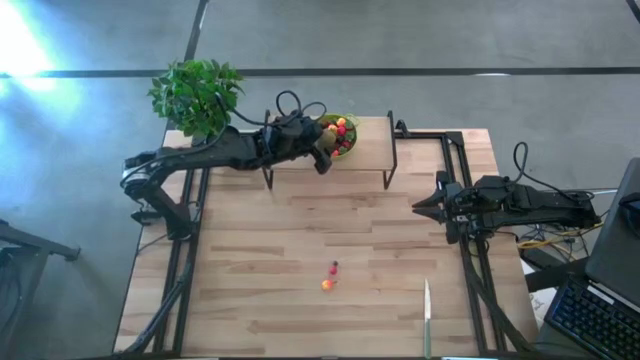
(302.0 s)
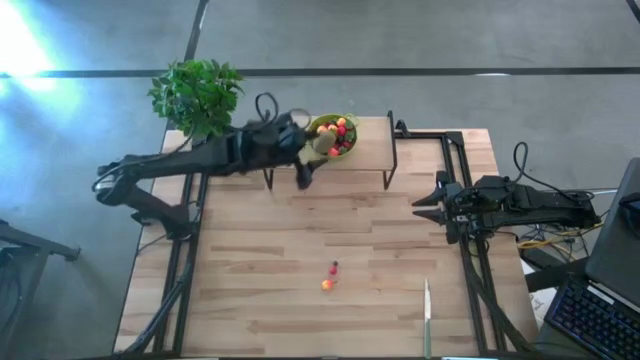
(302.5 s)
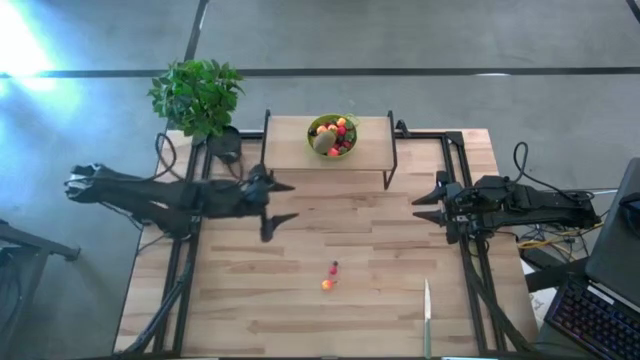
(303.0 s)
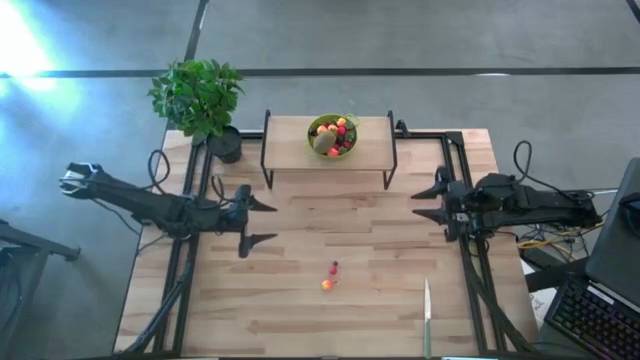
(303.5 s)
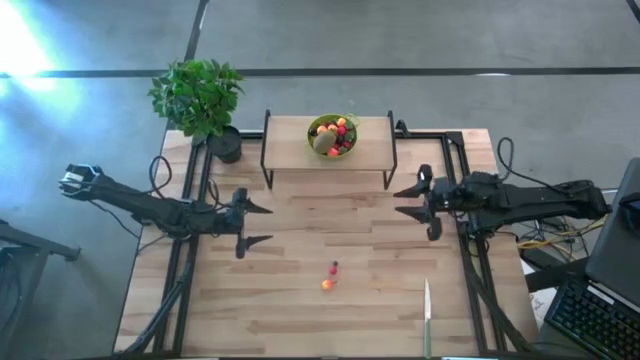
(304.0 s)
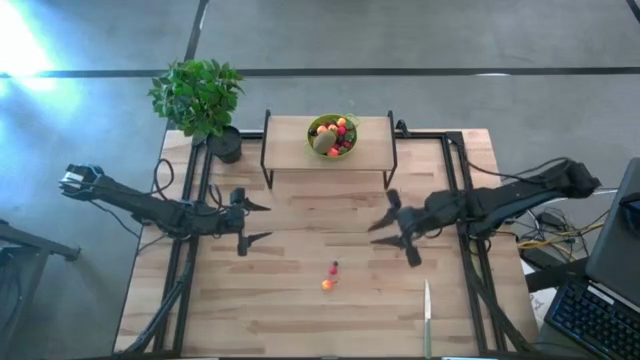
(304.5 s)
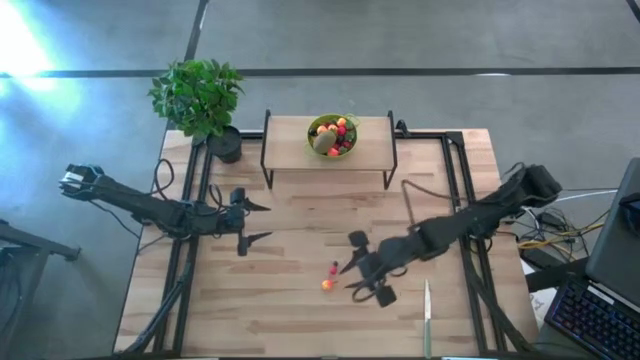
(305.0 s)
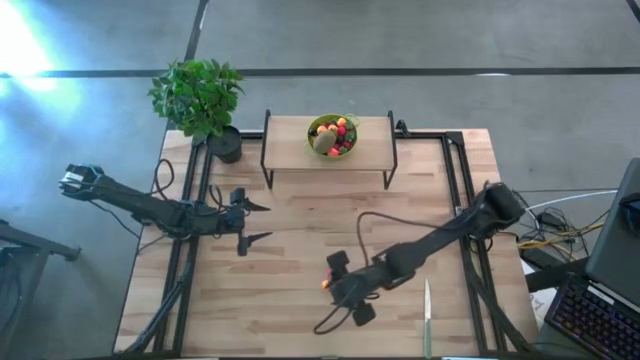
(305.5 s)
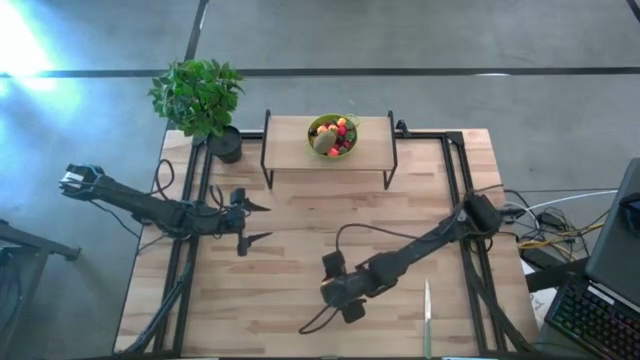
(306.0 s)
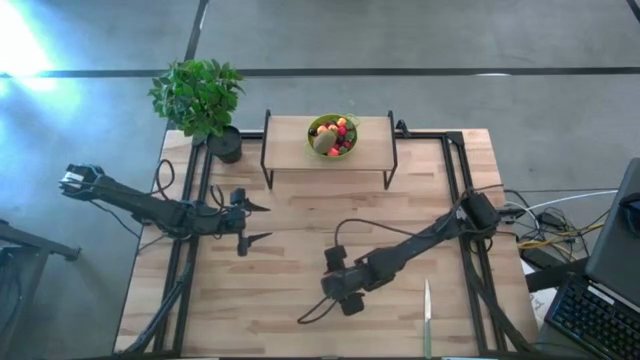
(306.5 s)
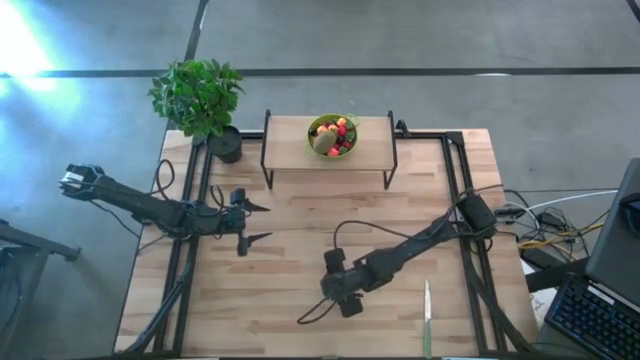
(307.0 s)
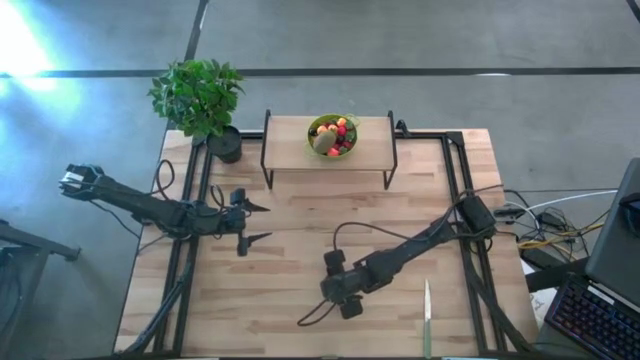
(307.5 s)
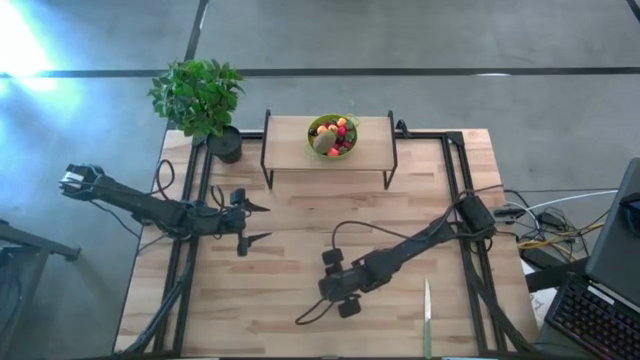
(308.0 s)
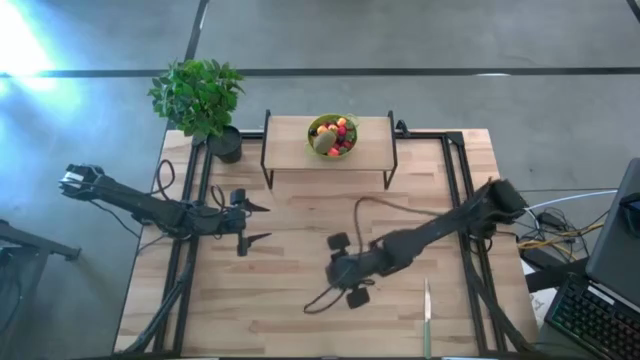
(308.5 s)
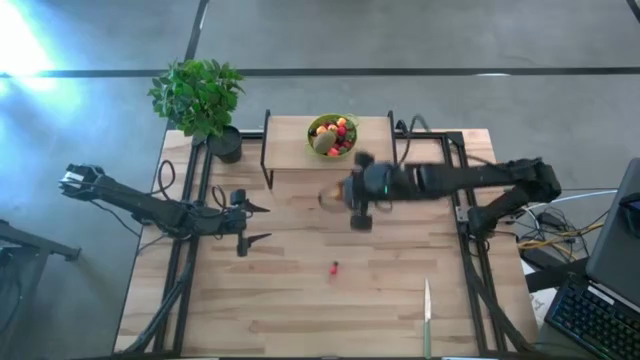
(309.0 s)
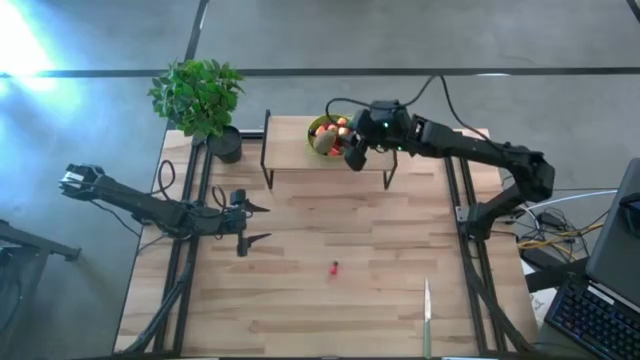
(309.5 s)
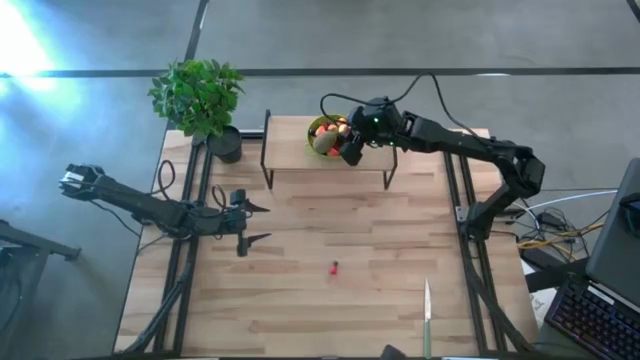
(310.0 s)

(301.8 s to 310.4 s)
Task: Pick & Place Fruit
Put the yellow peach into the green strainer bowl on the shelf

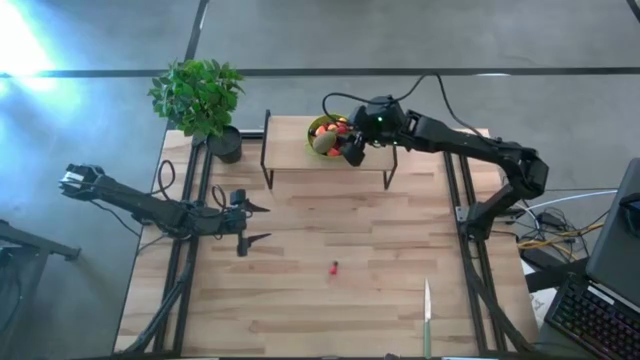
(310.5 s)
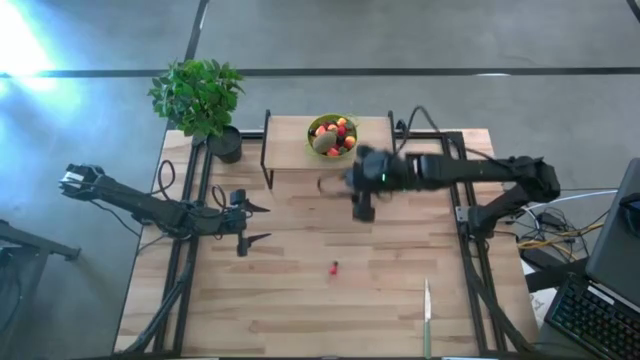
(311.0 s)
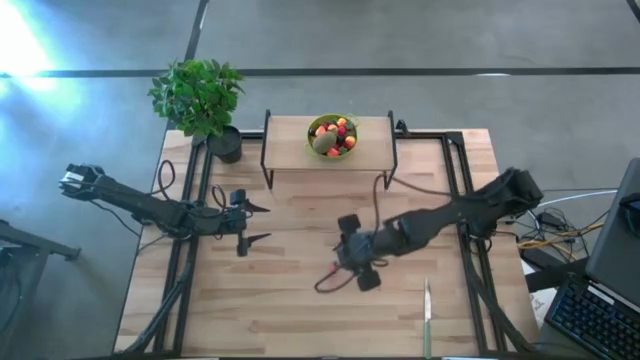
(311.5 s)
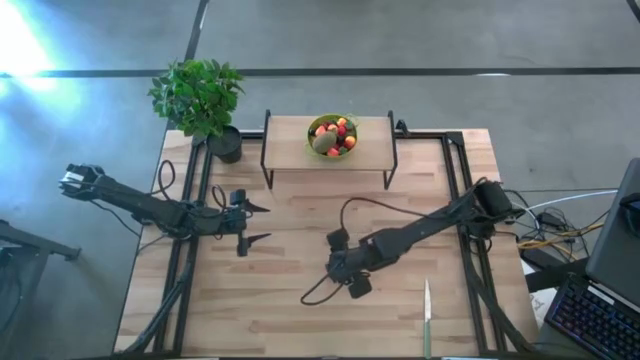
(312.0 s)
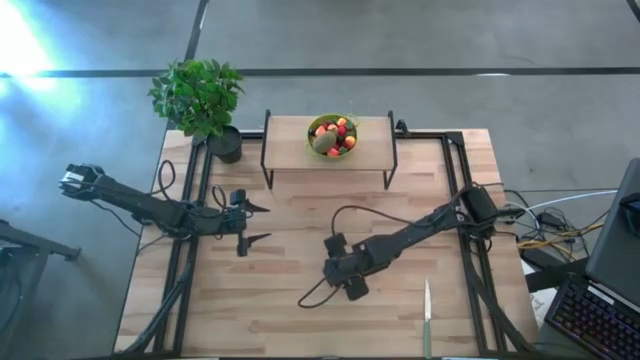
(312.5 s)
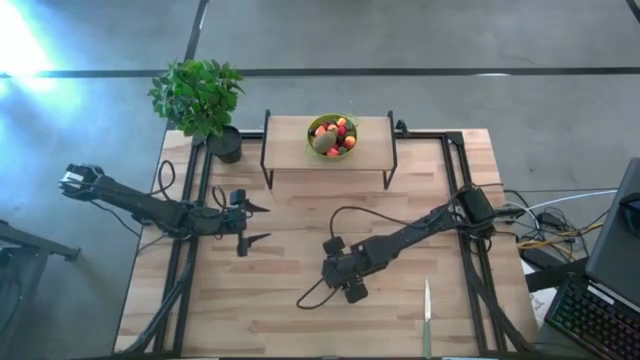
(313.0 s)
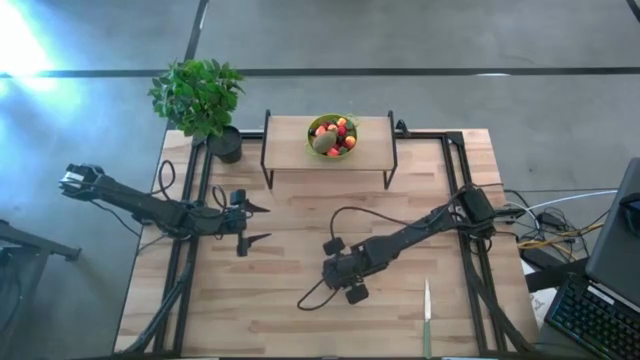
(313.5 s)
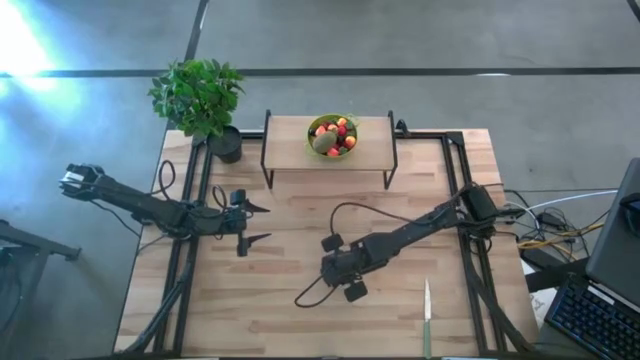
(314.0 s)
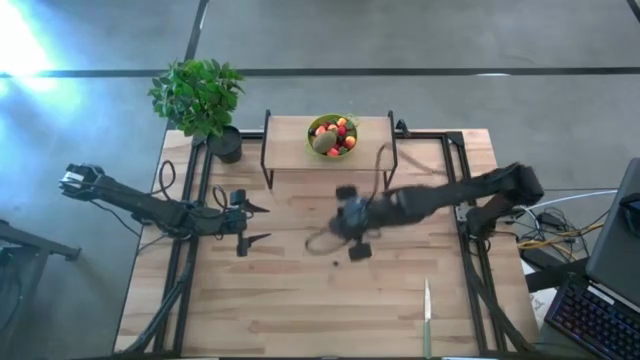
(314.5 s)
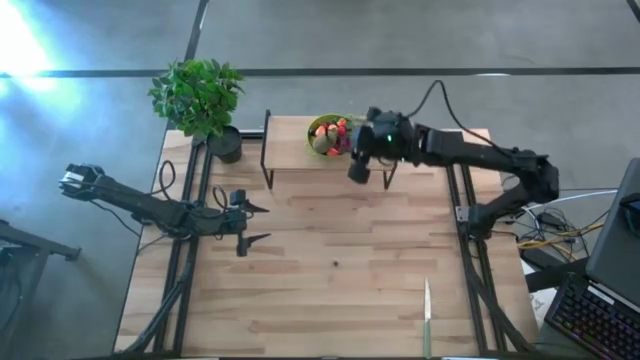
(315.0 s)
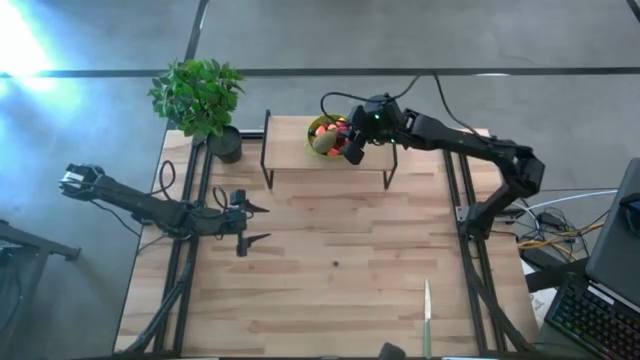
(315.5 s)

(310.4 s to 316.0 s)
Put the red raspberry into the green strainer bowl on the shelf

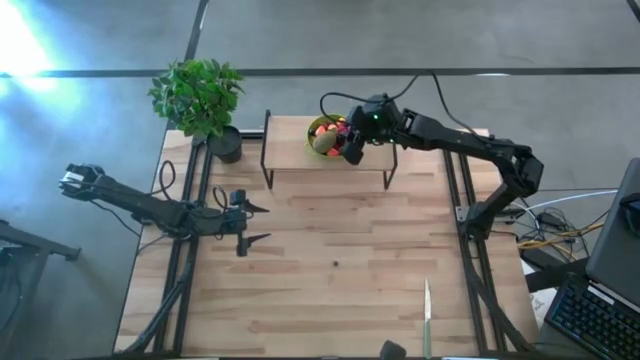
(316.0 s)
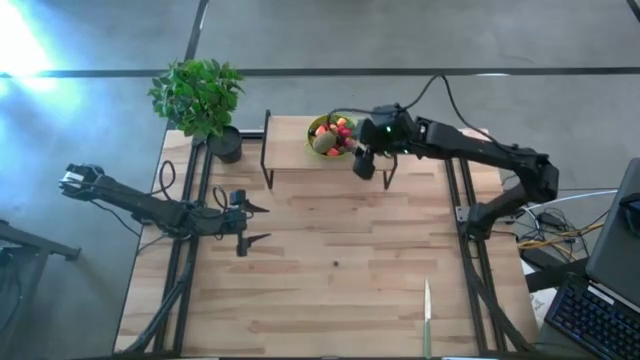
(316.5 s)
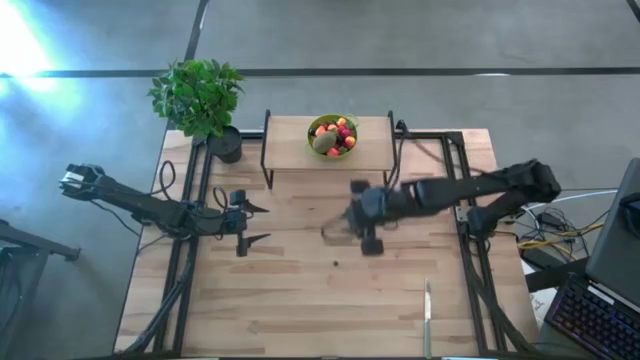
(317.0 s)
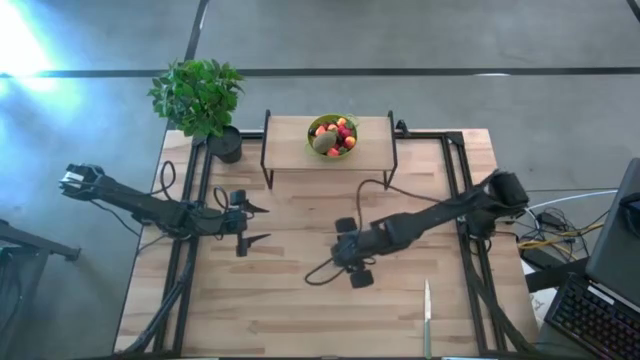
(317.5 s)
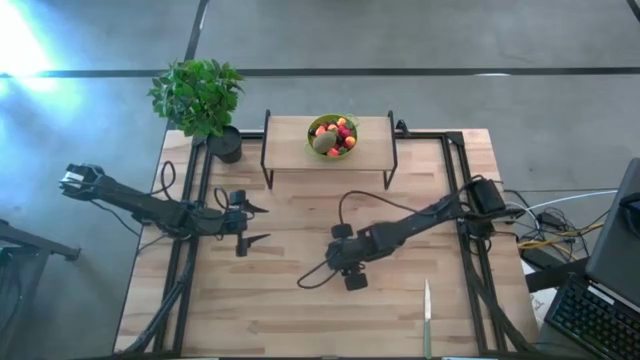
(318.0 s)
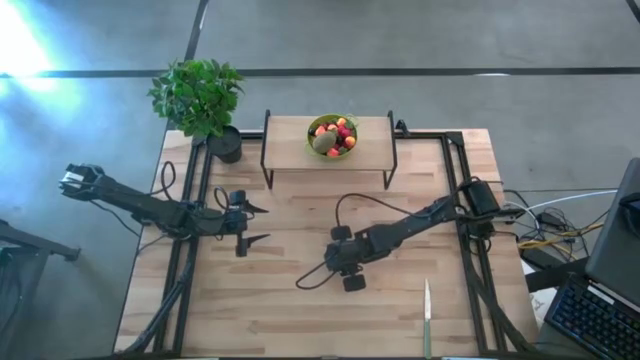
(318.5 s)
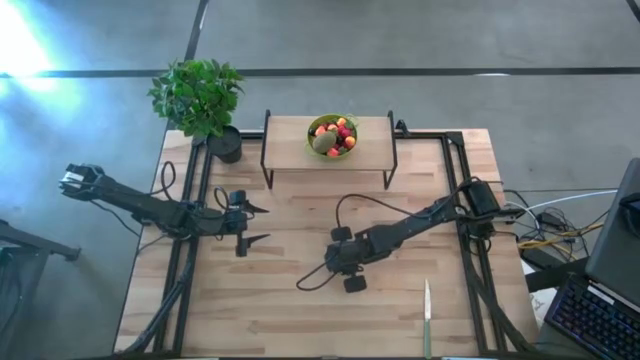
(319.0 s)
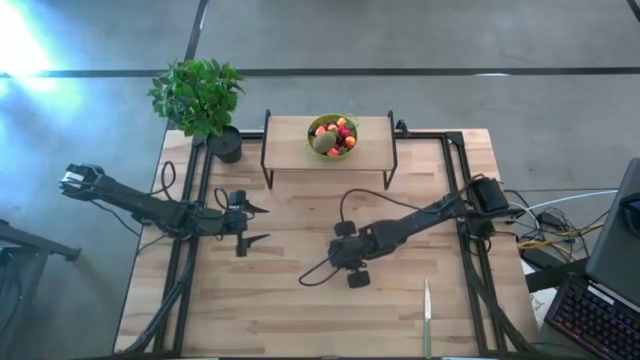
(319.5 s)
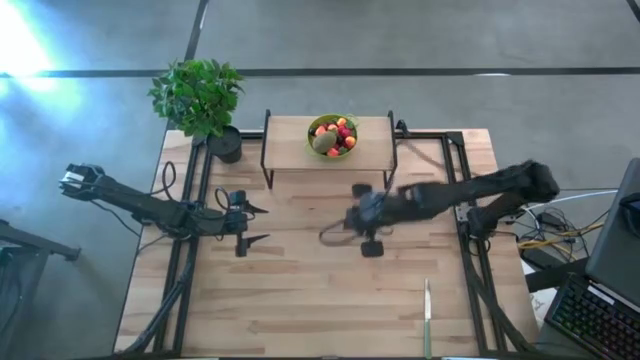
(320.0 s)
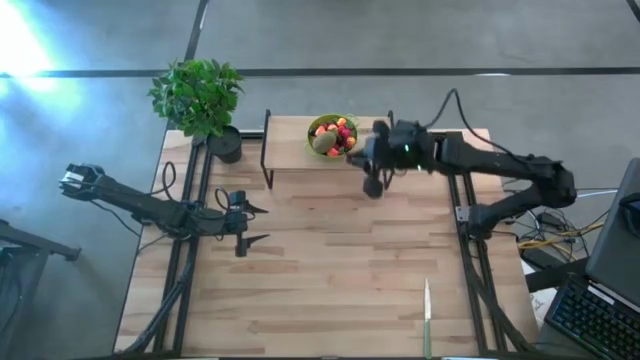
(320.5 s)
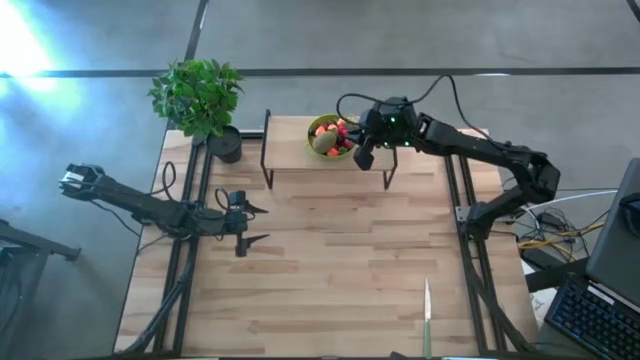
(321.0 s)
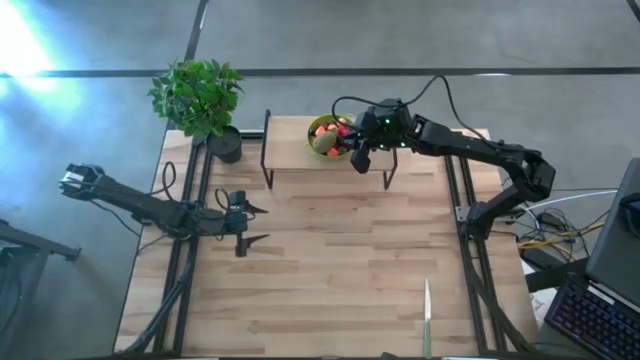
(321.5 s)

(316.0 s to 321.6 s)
Put the blueberry into the green strainer bowl on the shelf
